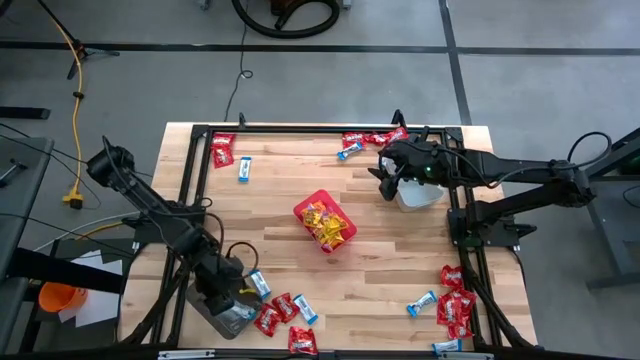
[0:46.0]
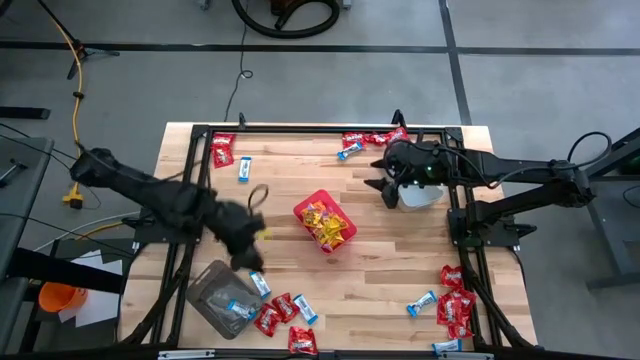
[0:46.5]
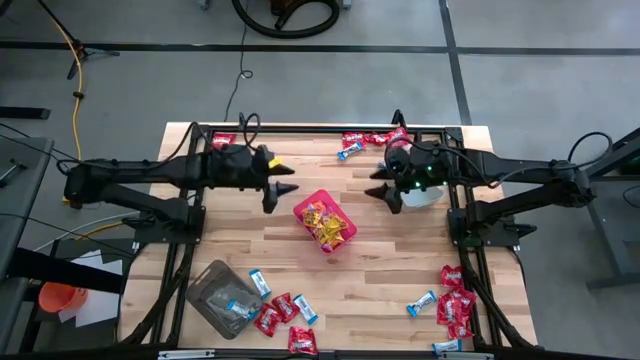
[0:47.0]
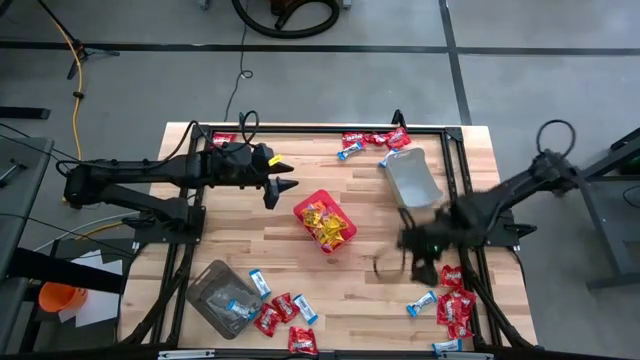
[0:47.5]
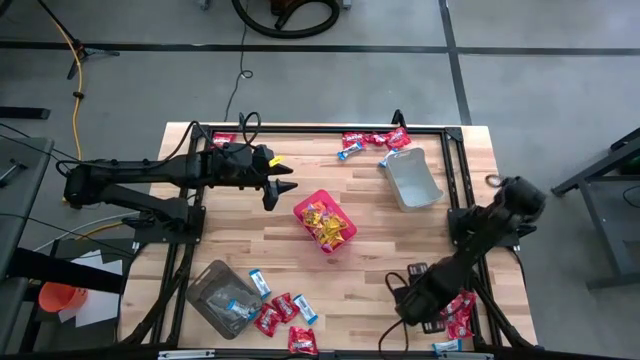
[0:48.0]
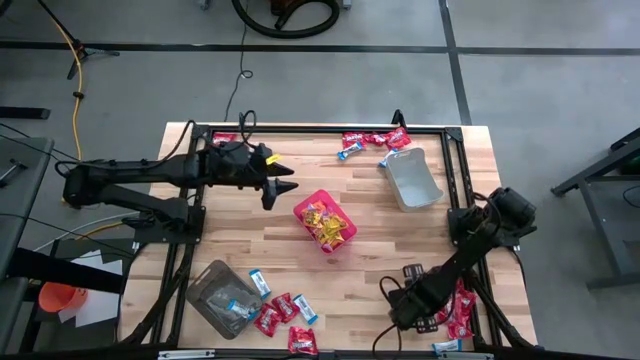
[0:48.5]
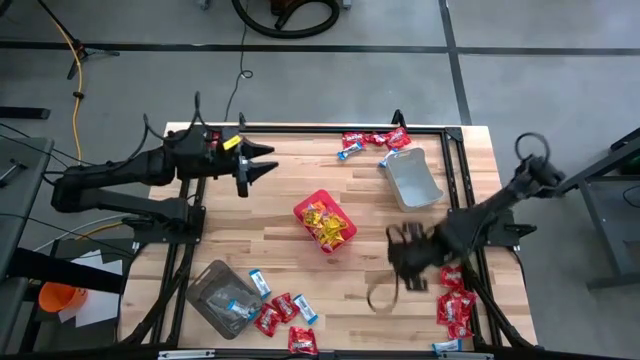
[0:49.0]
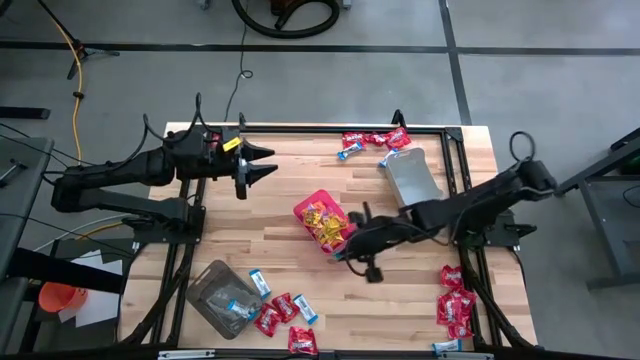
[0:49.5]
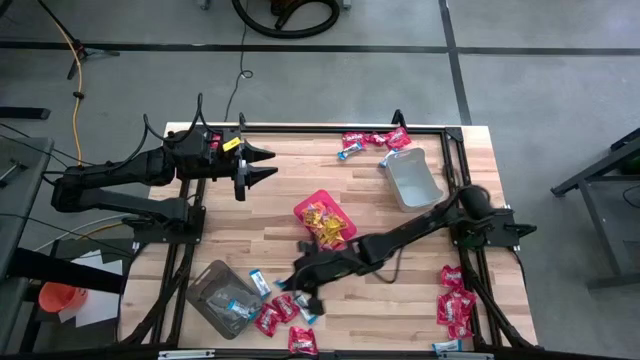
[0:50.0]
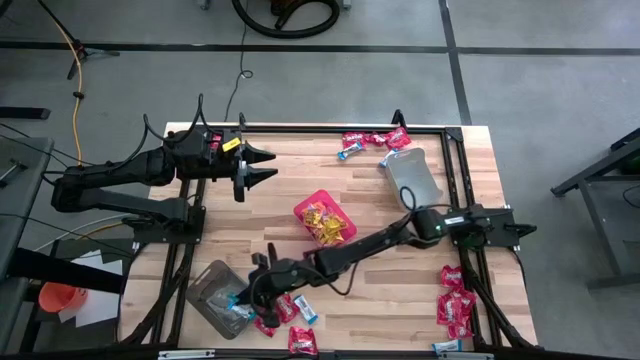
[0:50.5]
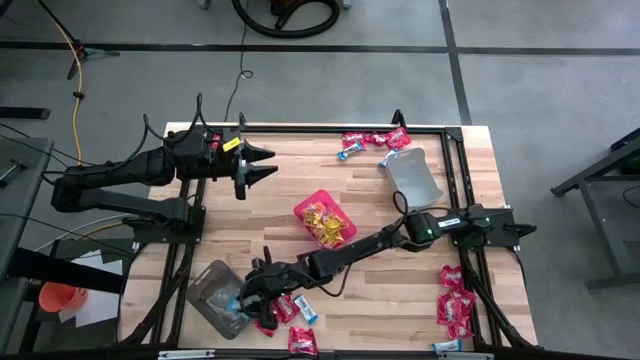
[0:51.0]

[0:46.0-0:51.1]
Task: Sort candy
Put the blue candy into the black bin

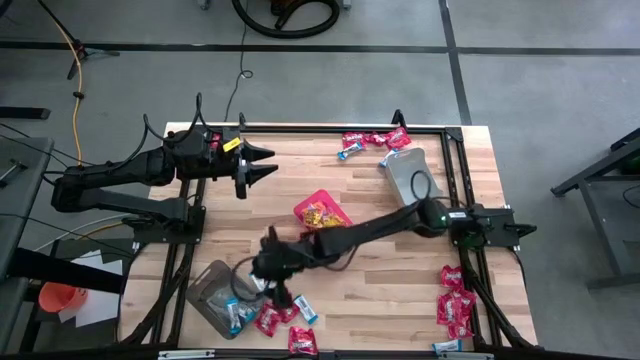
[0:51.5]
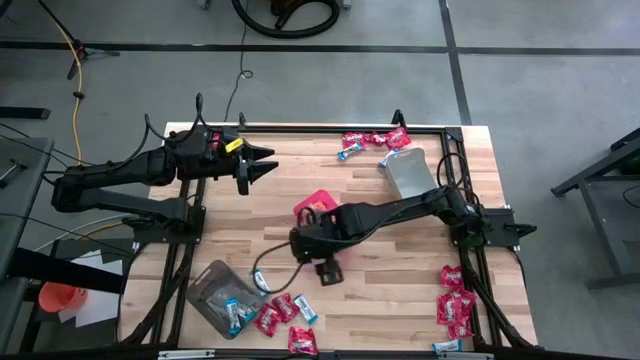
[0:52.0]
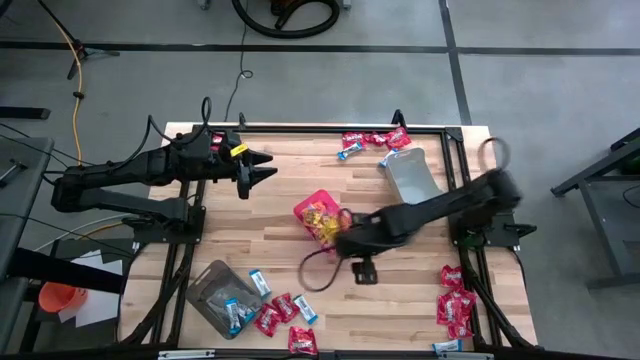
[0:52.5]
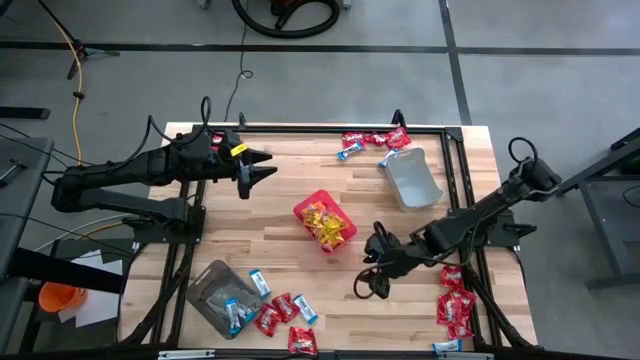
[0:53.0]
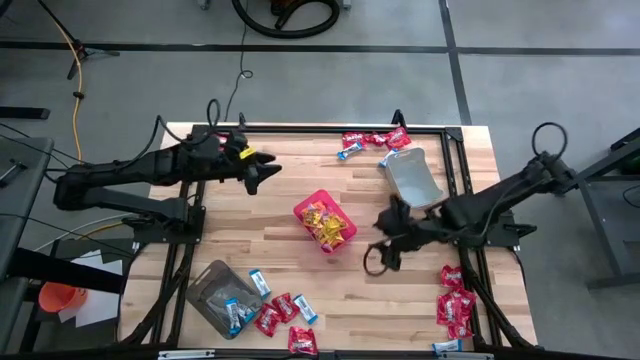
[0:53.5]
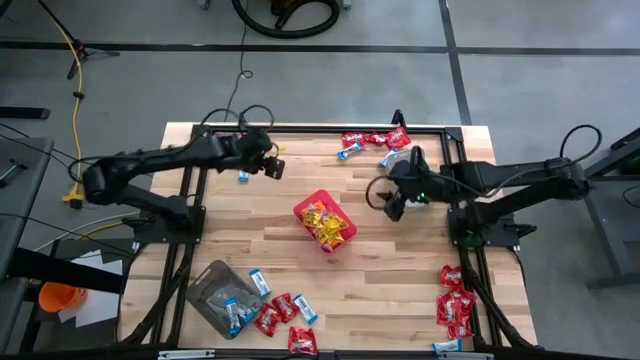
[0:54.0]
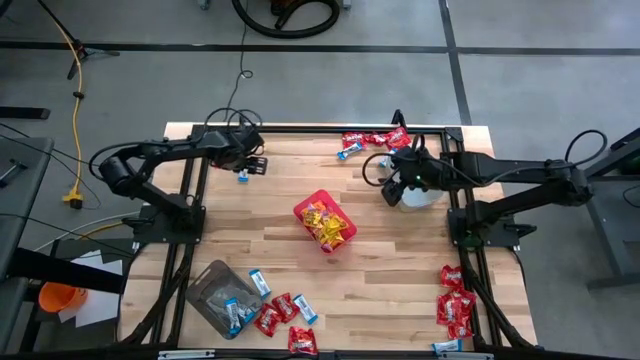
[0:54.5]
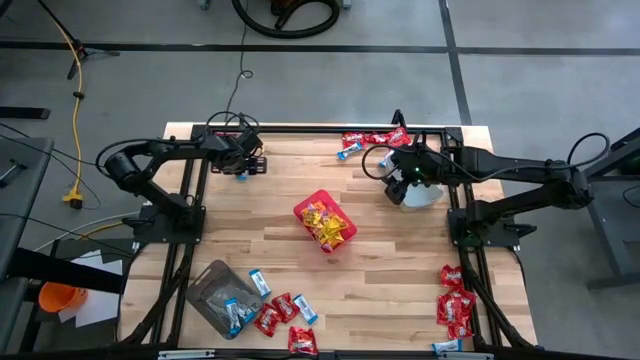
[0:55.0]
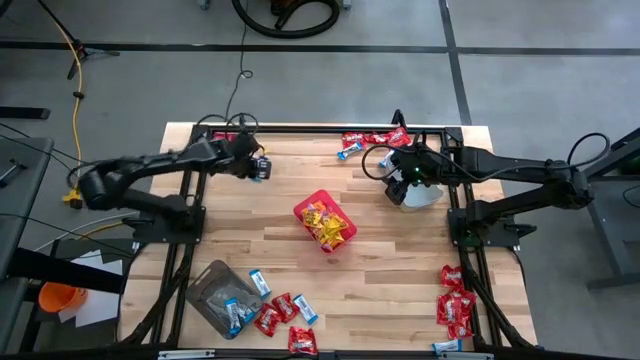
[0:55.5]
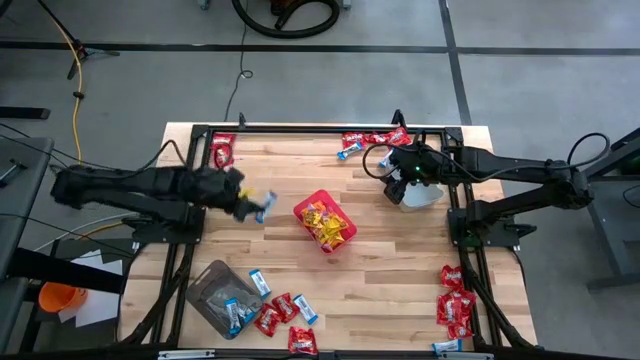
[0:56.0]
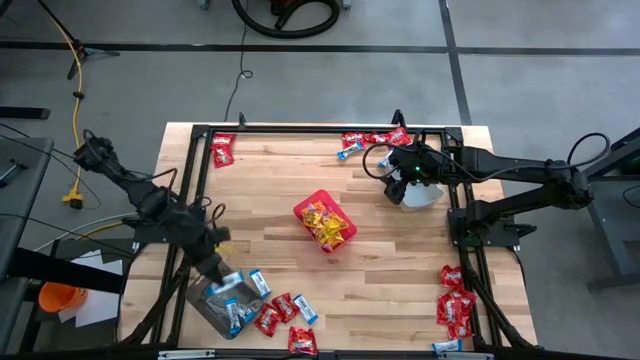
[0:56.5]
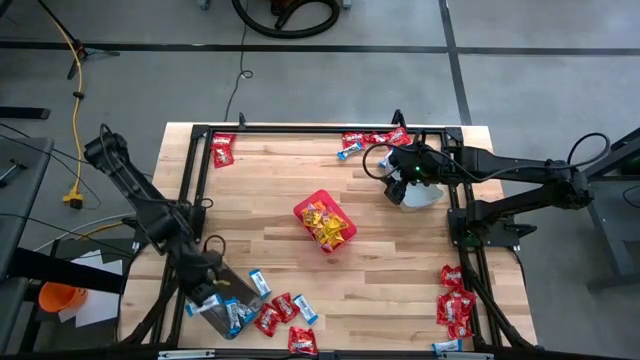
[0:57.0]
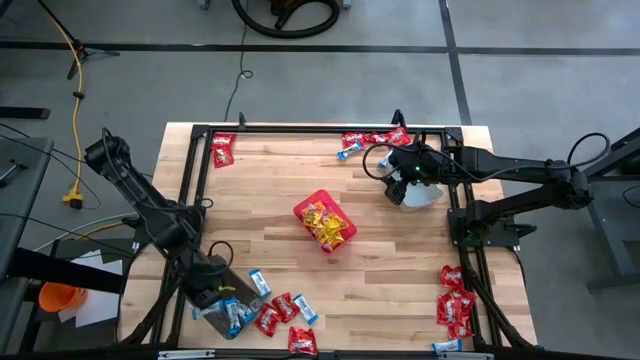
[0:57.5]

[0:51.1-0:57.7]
Put the blue candy into the black bin

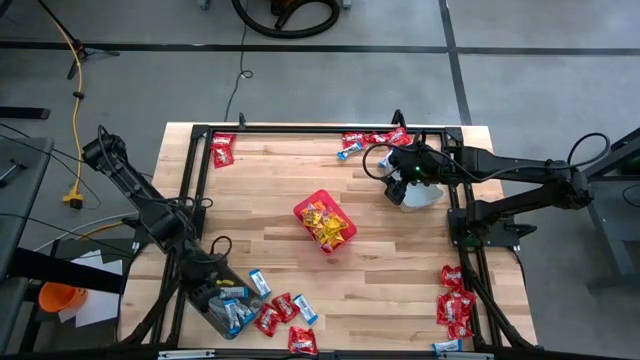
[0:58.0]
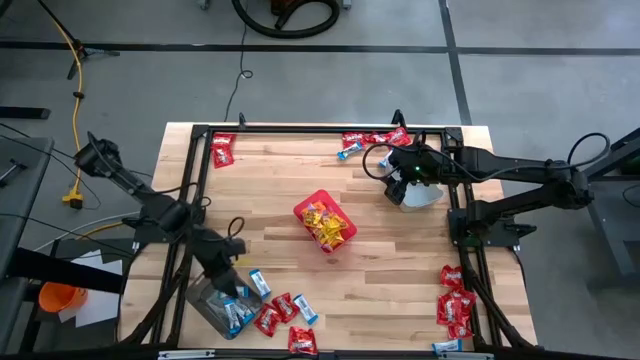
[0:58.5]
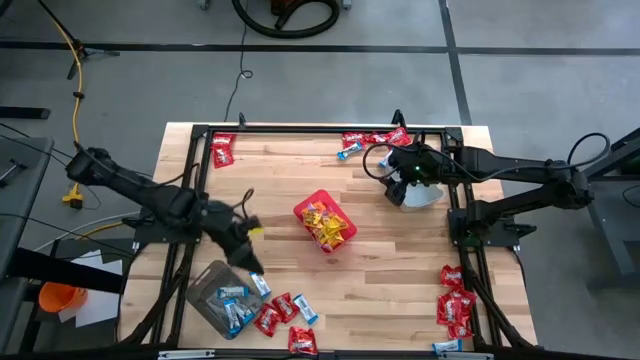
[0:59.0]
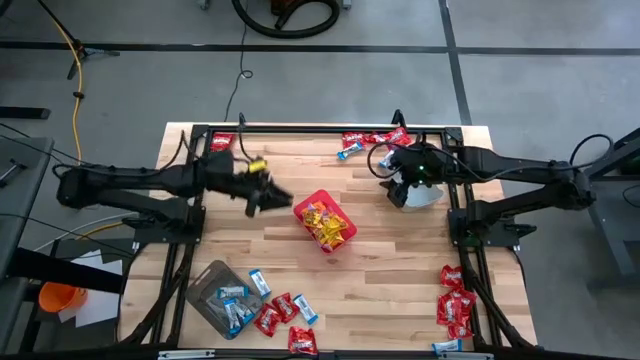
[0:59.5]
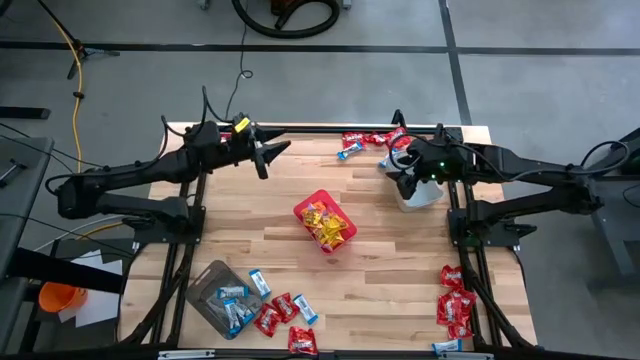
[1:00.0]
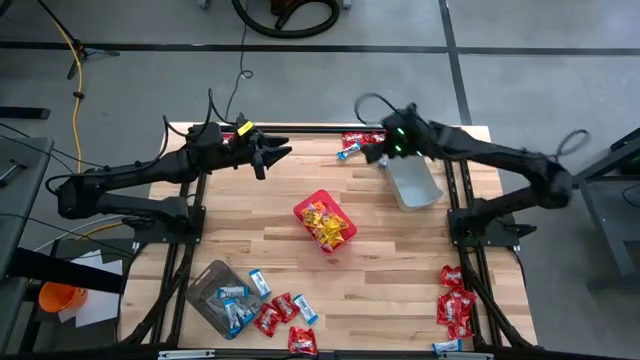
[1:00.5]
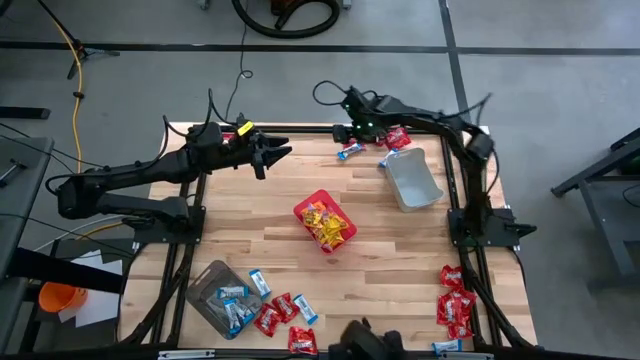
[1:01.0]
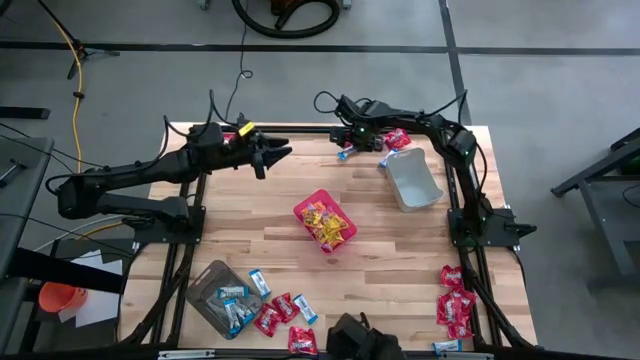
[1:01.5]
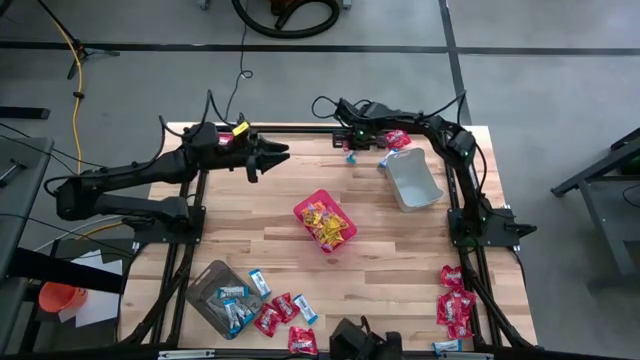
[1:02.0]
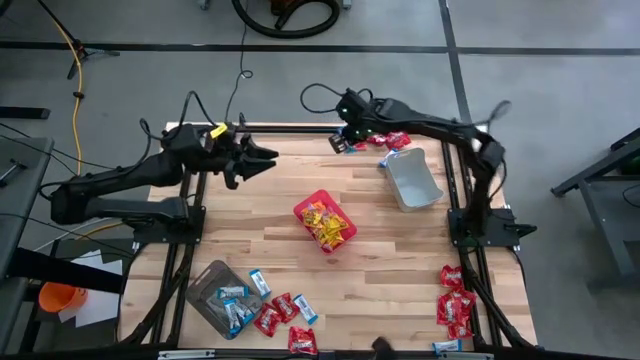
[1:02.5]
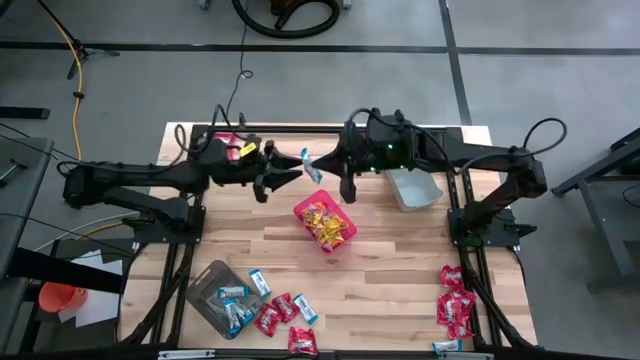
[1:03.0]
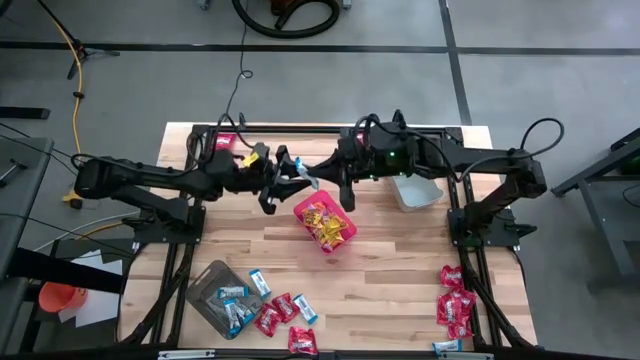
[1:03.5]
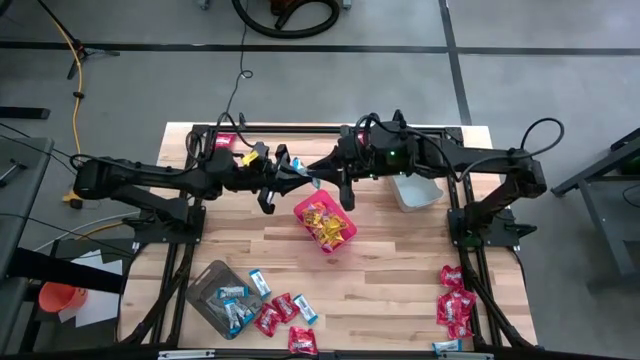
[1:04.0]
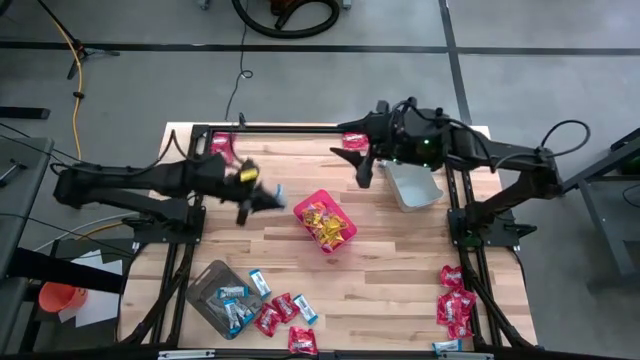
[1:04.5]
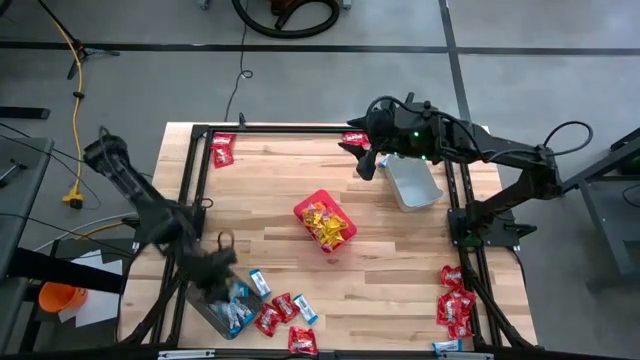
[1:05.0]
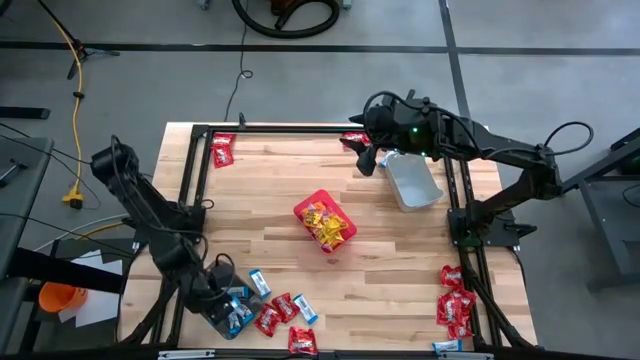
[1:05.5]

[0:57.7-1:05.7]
Put the blue candy into the black bin

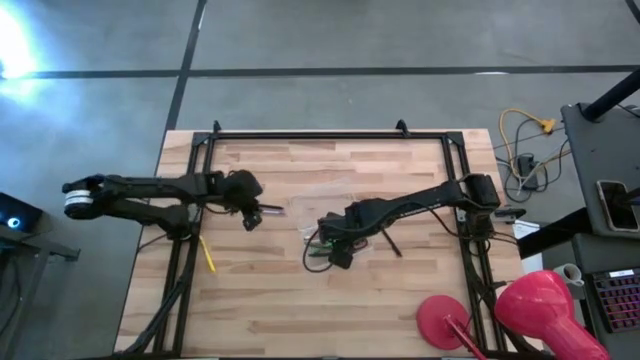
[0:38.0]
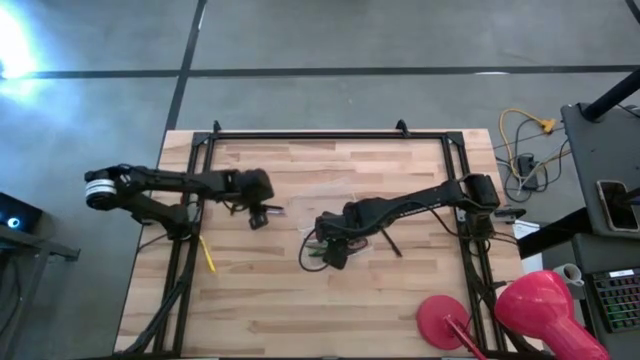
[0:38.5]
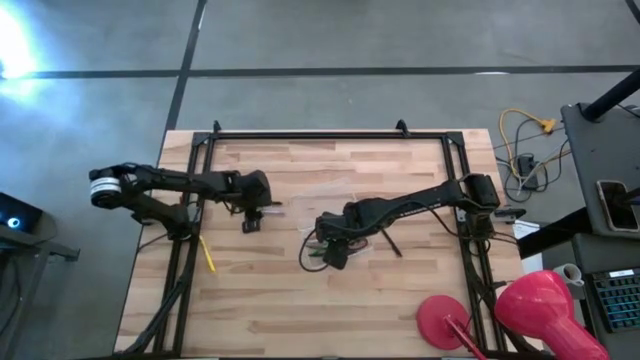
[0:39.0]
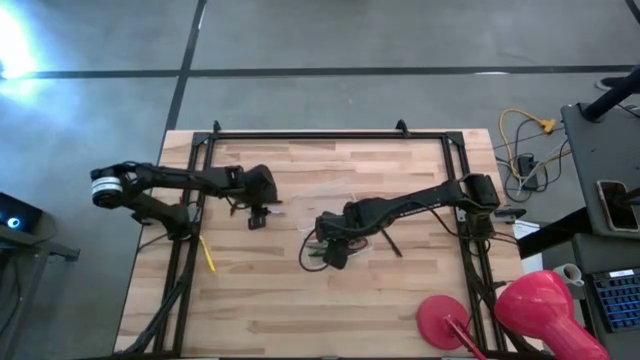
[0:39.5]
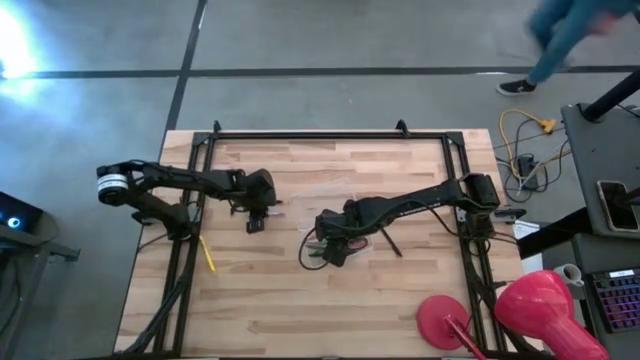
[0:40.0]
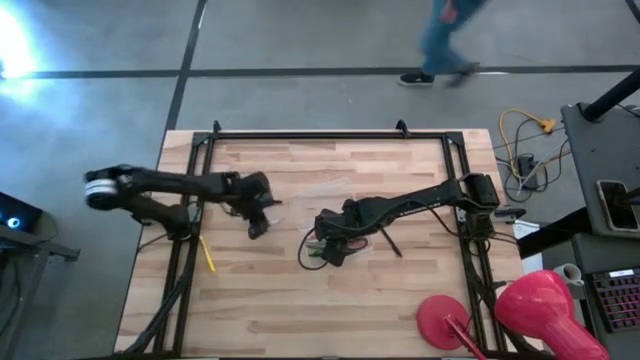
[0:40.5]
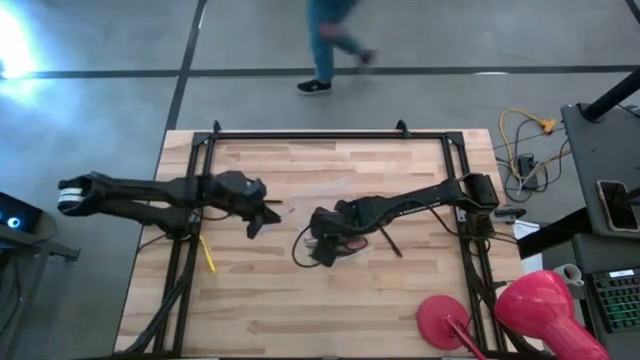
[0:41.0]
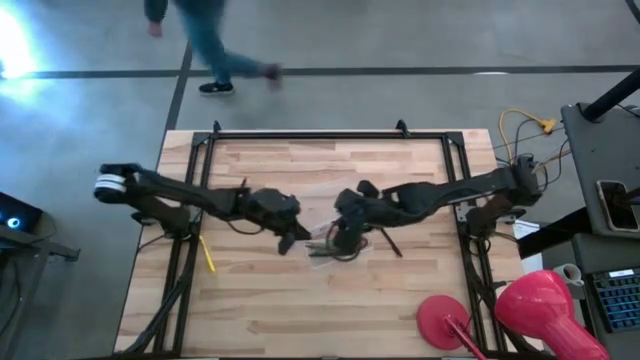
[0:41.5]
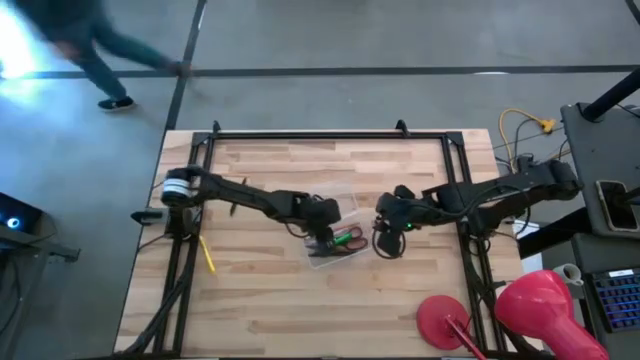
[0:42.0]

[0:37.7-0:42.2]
Task: Pick & place school supplies into a supply box
Put the purple pen into the transparent supply box
